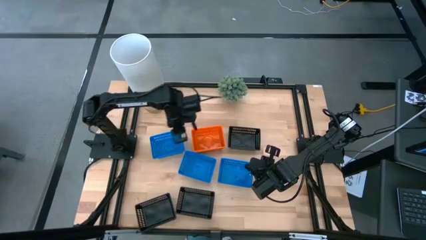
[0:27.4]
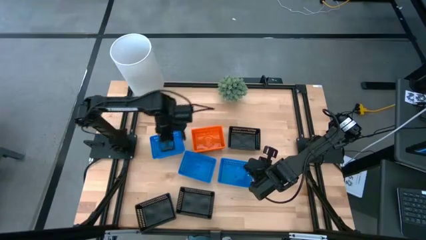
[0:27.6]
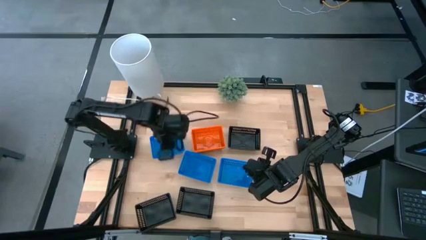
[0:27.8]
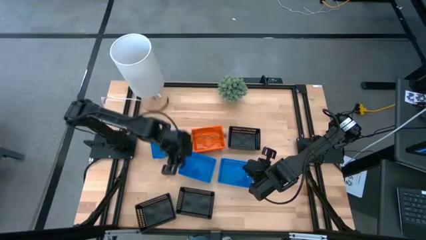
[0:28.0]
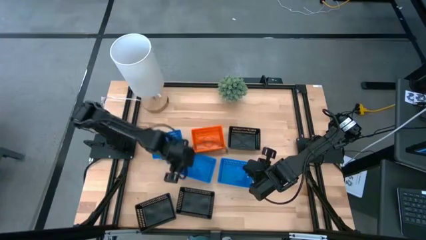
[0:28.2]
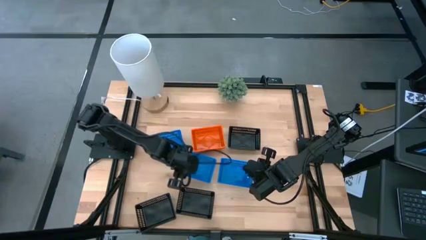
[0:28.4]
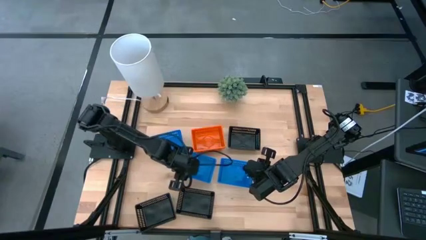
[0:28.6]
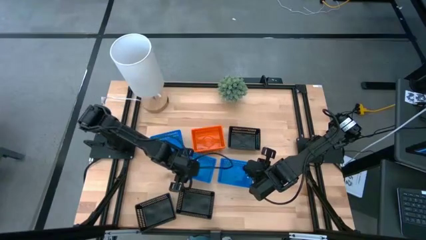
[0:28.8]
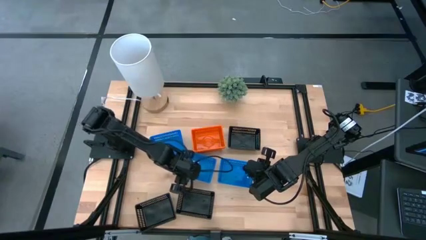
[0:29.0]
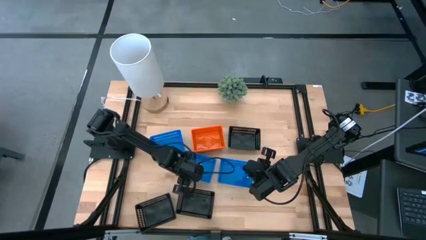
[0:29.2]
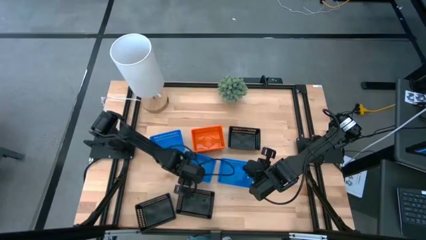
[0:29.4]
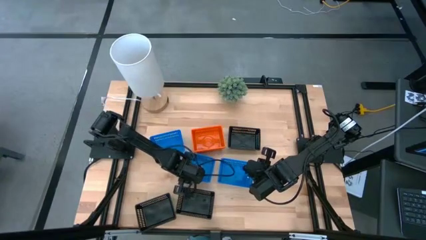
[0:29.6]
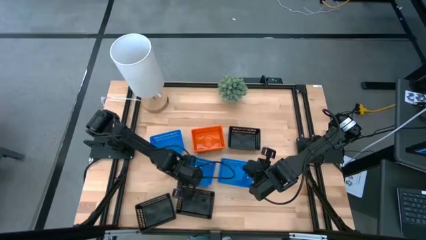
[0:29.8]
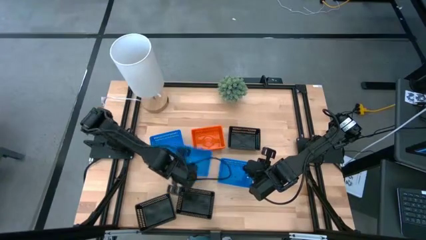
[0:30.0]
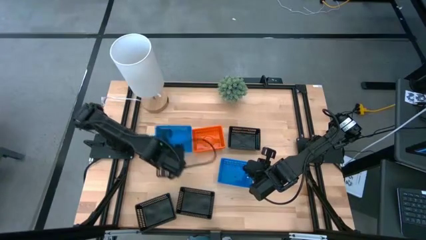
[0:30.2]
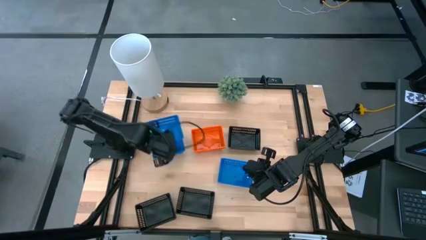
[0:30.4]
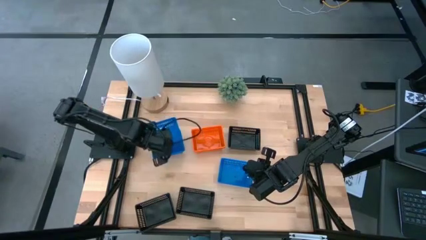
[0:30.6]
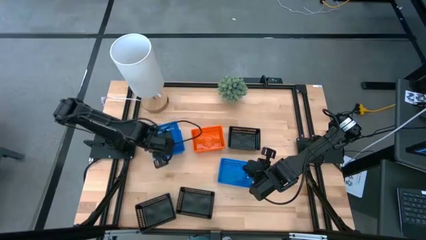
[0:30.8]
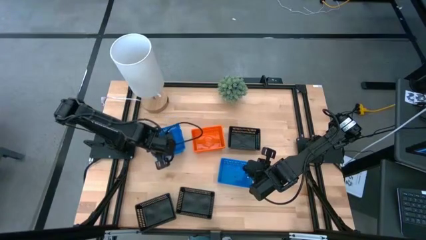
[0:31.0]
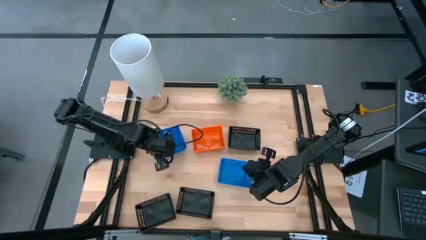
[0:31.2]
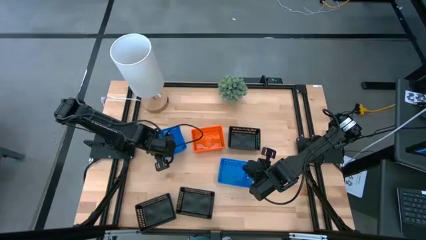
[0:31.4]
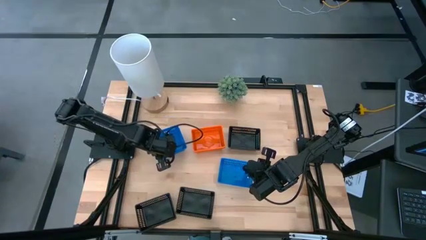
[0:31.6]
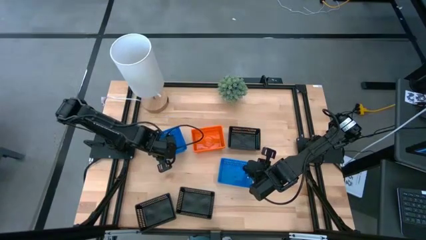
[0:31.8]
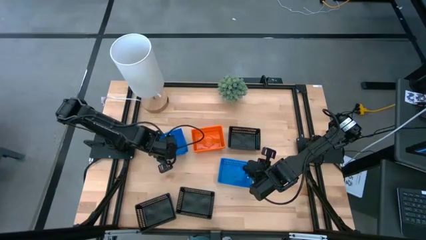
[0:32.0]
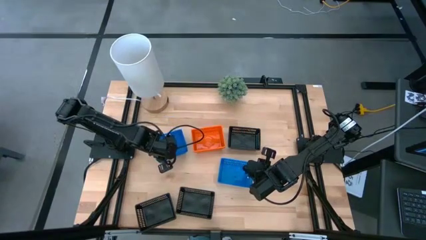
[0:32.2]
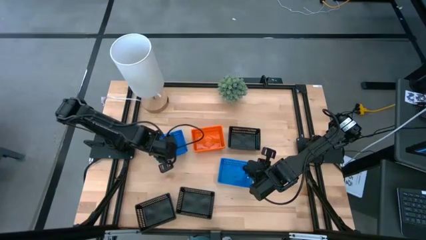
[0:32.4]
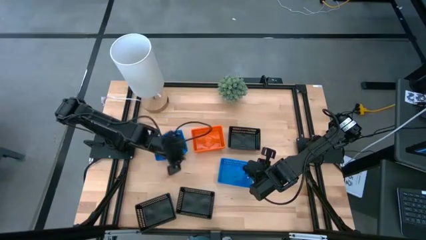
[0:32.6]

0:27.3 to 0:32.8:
Stack the center blue bin on the top of the top blue bin

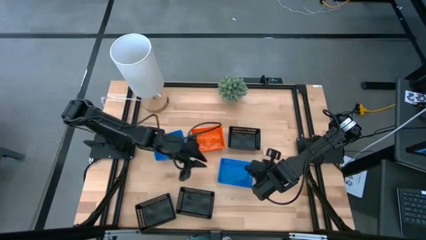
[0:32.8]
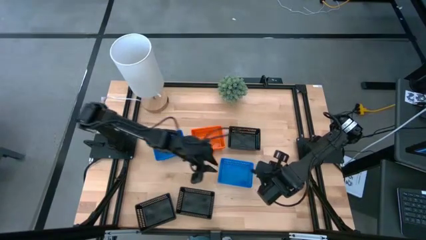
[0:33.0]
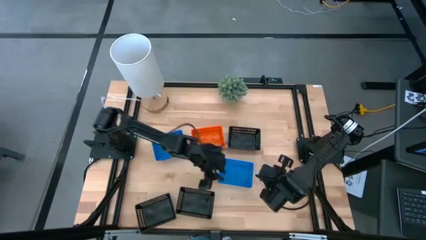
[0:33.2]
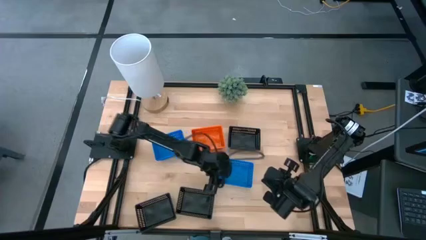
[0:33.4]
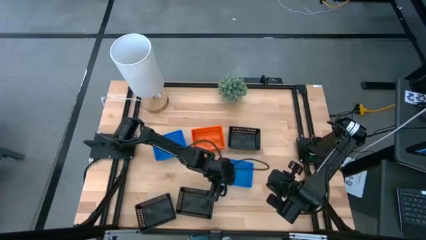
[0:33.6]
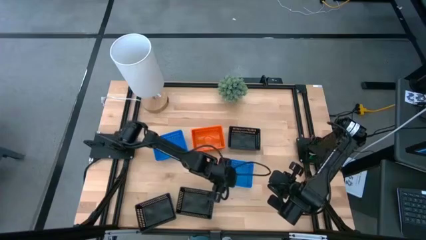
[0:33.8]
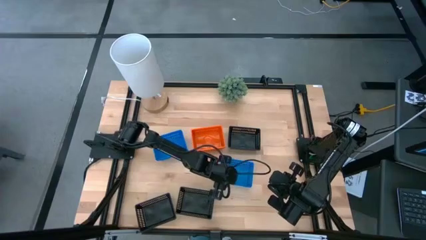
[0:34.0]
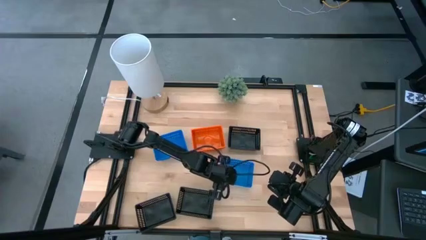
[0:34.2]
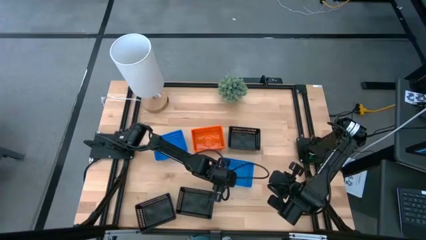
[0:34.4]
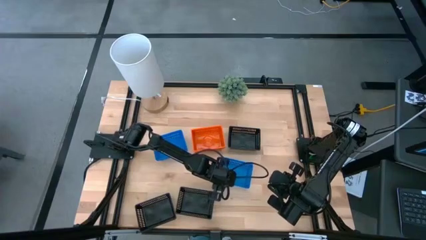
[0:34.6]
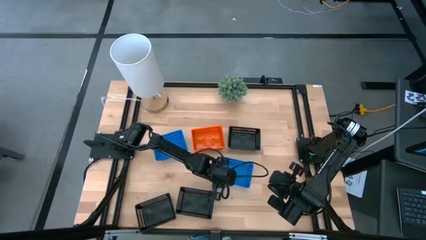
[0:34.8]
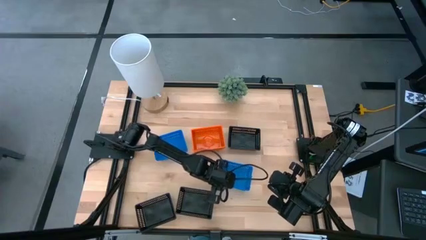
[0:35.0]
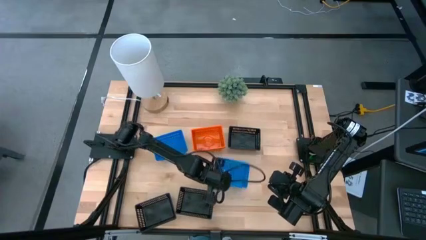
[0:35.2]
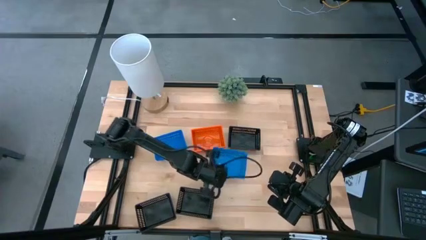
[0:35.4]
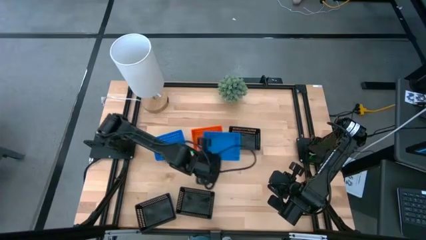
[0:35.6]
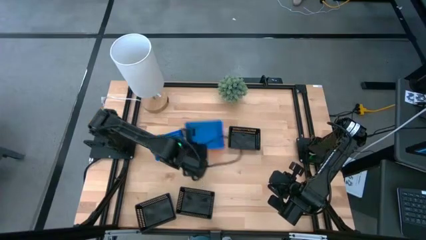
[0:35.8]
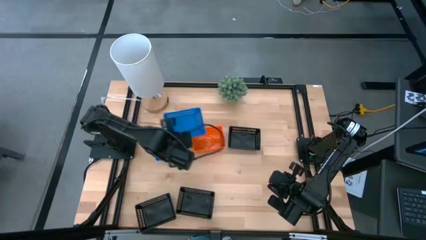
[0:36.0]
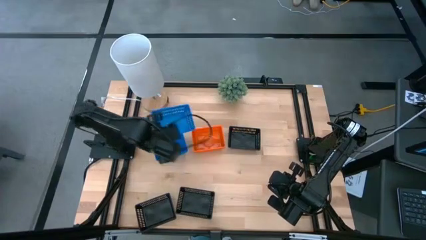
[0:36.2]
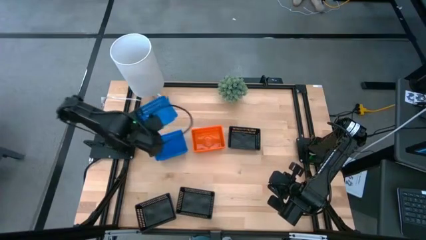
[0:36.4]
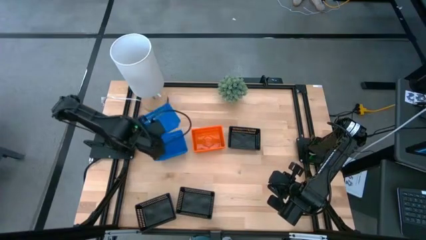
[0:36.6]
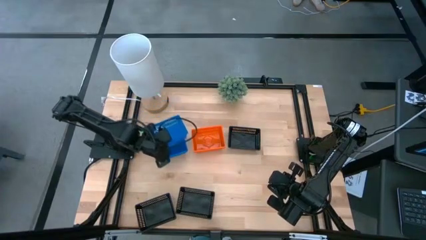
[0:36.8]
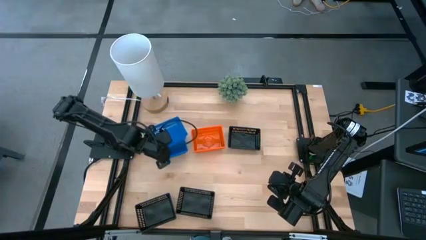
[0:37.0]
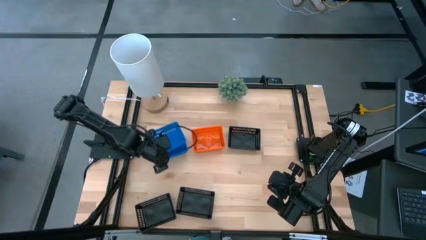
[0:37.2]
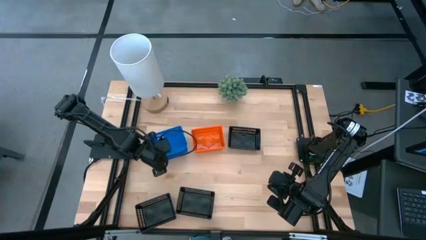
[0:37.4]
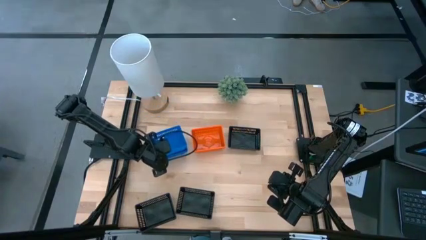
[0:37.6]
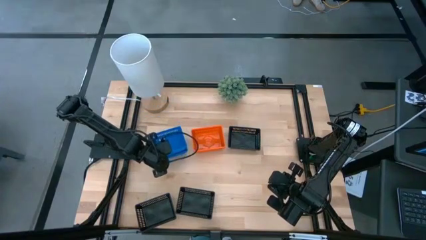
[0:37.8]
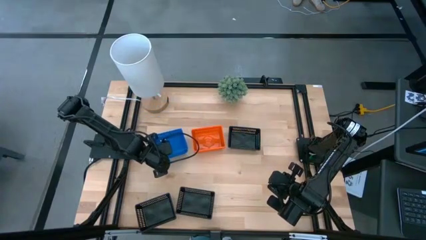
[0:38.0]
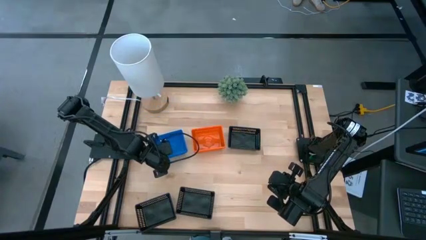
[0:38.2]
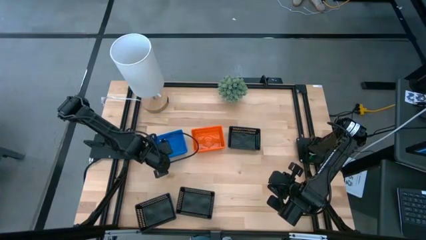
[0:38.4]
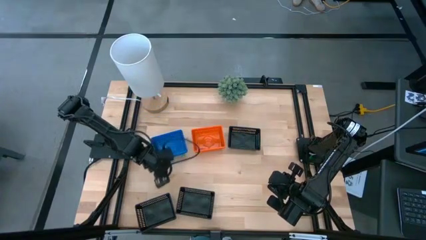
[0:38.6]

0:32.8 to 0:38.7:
Stack the bottom bin on the top of the top blue bins

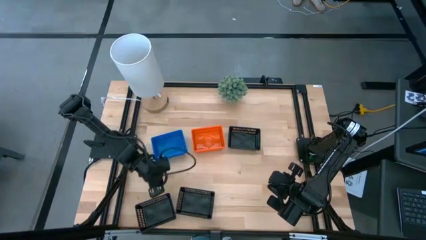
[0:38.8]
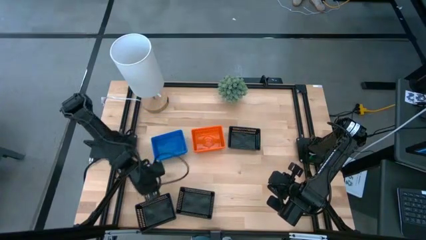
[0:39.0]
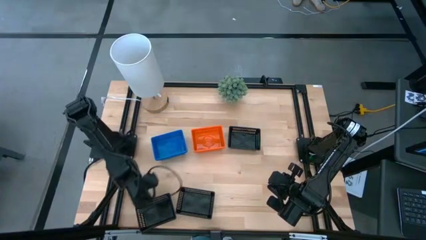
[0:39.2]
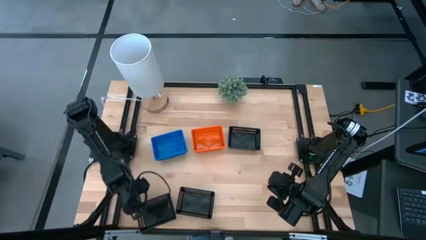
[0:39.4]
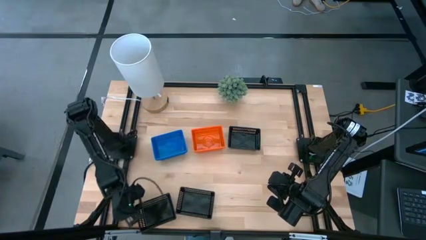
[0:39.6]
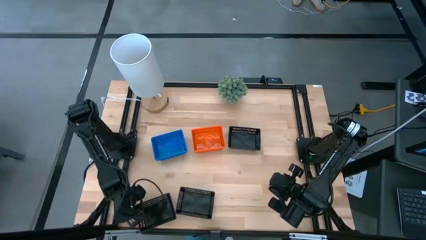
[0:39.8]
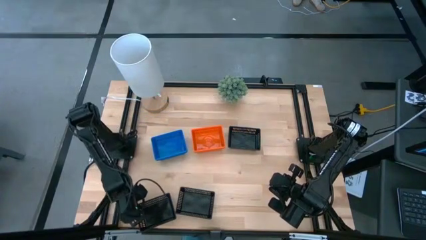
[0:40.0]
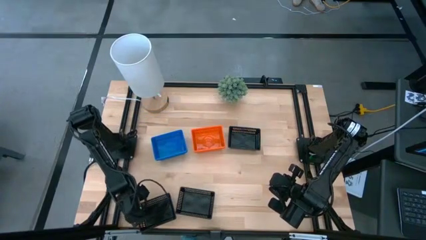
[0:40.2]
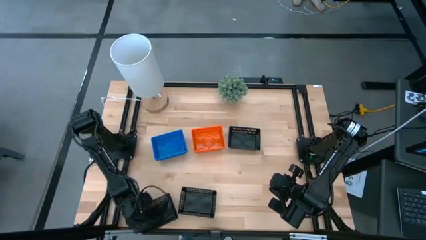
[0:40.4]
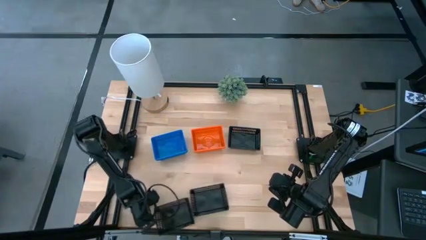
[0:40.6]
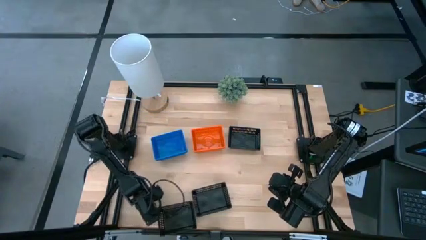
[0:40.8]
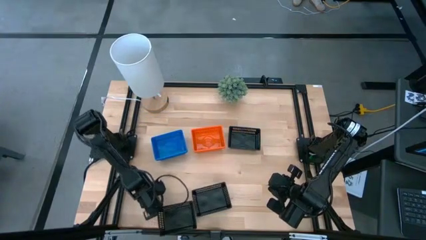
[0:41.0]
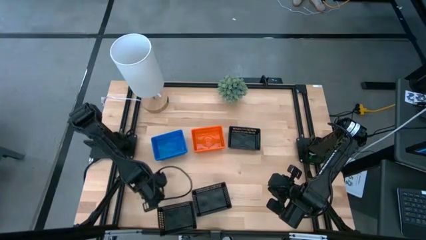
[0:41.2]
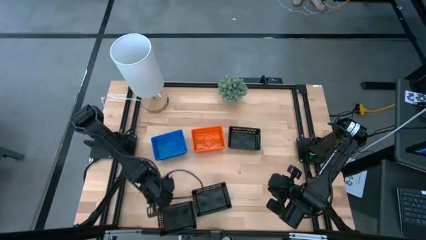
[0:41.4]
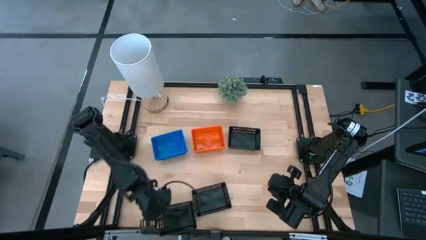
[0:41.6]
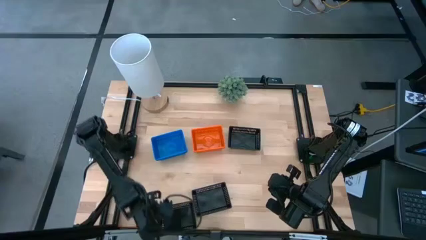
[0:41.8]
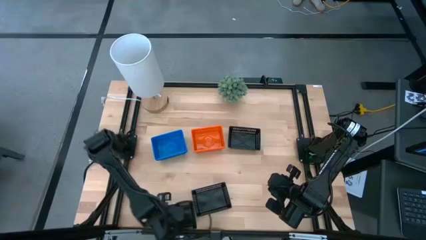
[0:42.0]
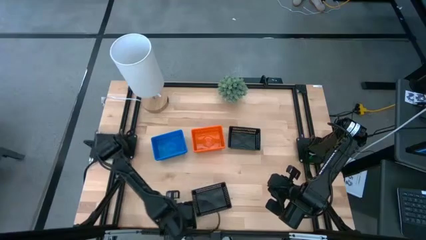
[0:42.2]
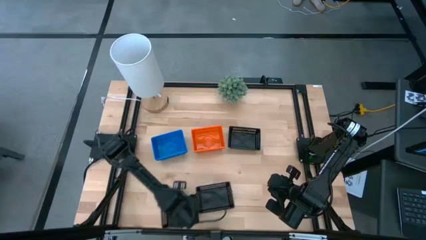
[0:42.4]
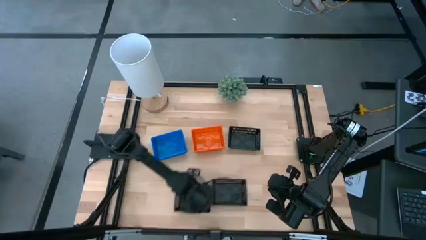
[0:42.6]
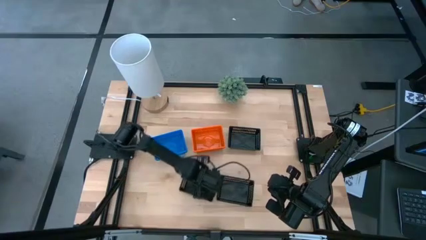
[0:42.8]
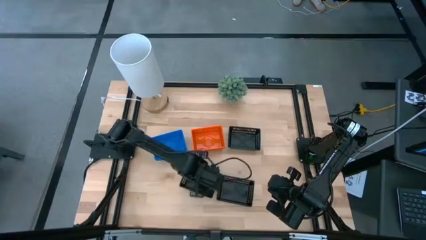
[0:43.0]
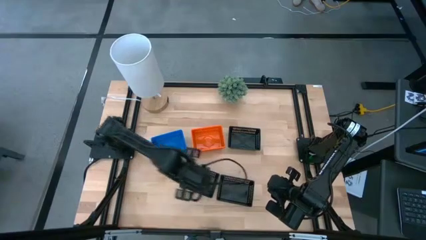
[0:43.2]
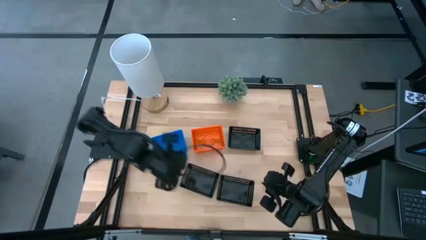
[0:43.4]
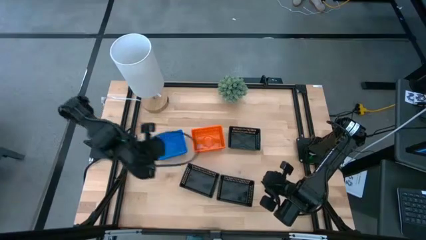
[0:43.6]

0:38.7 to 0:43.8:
Move the black bins from most bottom left to the center of the table
